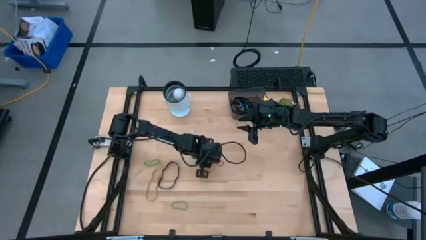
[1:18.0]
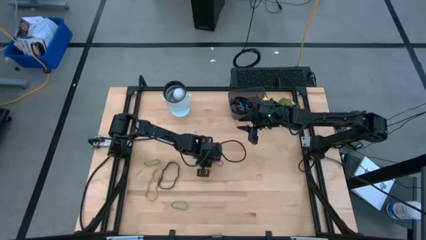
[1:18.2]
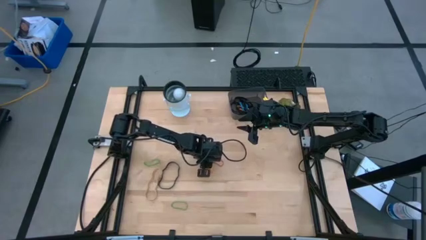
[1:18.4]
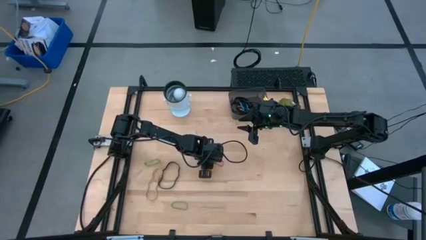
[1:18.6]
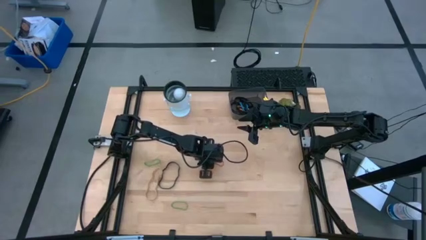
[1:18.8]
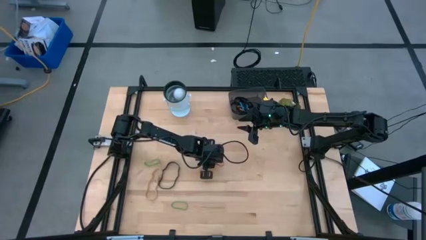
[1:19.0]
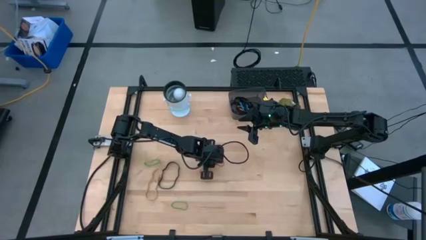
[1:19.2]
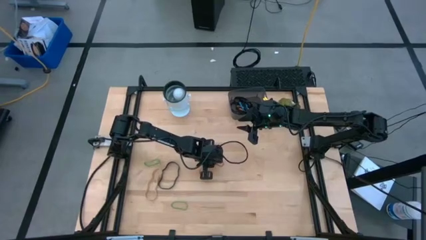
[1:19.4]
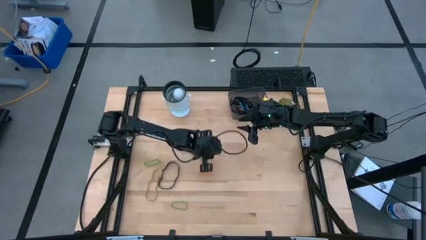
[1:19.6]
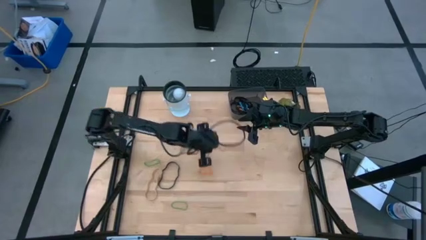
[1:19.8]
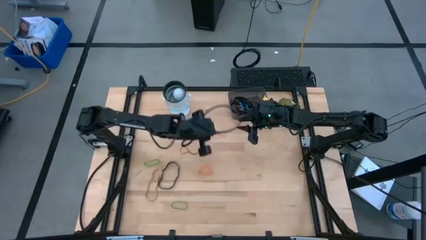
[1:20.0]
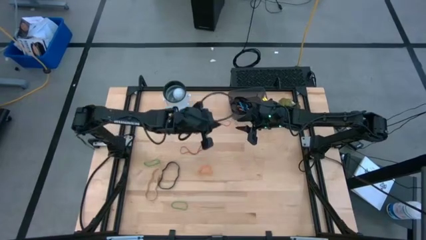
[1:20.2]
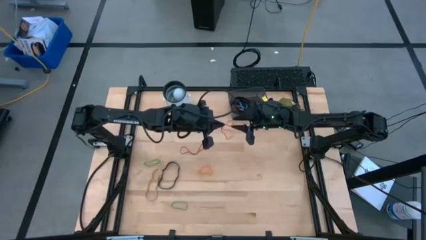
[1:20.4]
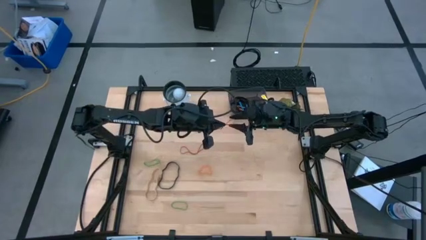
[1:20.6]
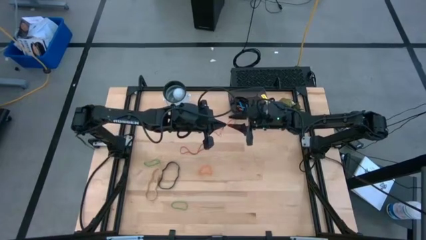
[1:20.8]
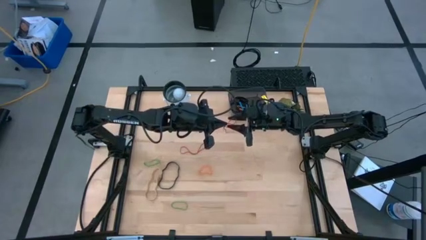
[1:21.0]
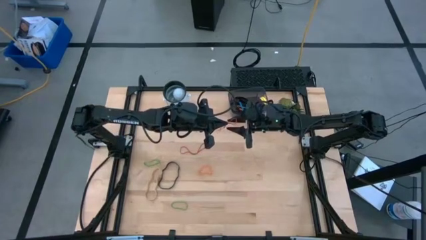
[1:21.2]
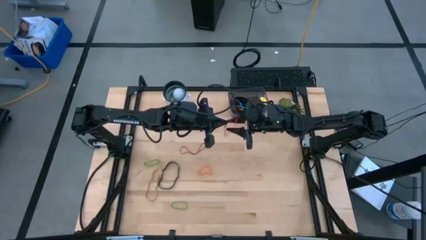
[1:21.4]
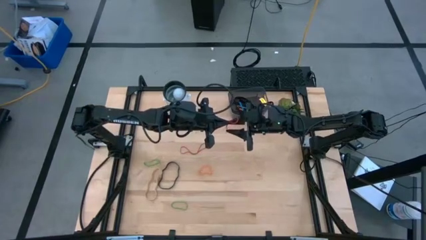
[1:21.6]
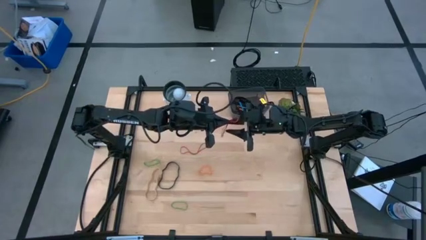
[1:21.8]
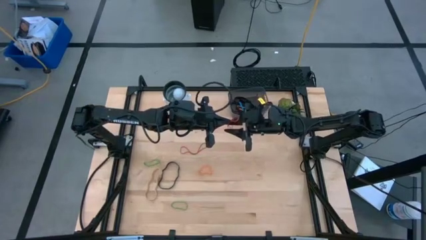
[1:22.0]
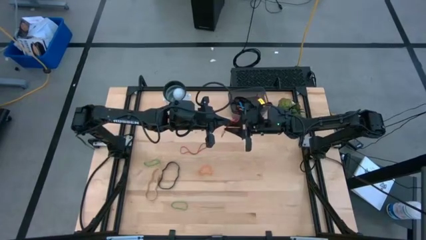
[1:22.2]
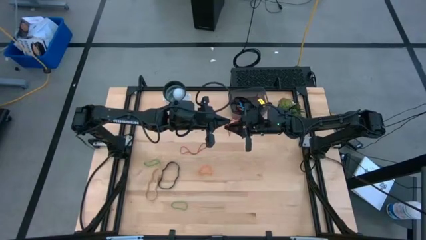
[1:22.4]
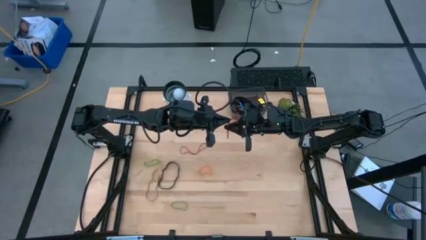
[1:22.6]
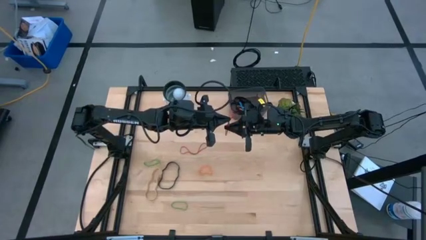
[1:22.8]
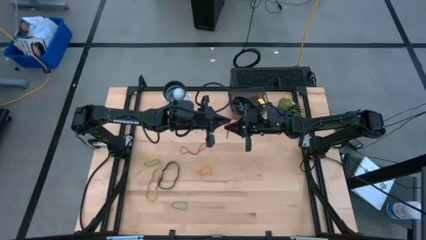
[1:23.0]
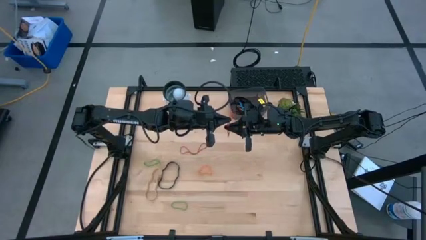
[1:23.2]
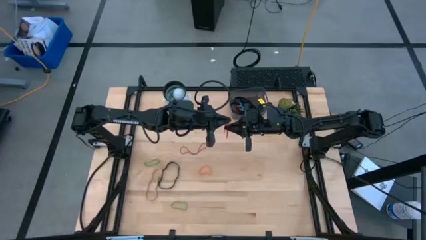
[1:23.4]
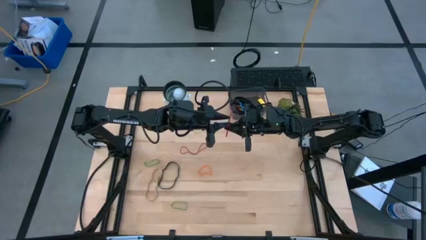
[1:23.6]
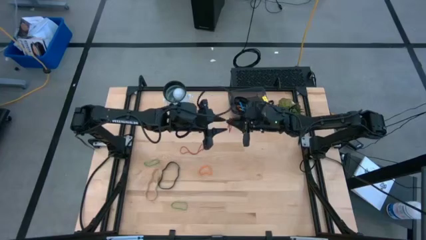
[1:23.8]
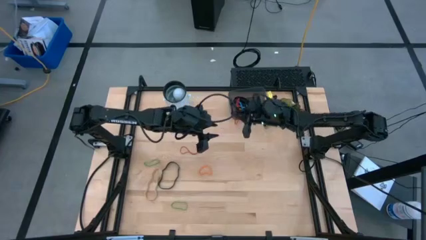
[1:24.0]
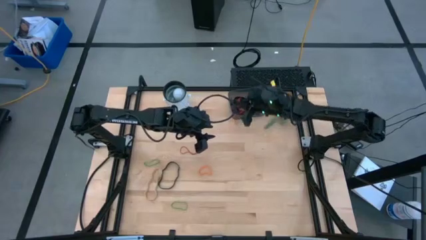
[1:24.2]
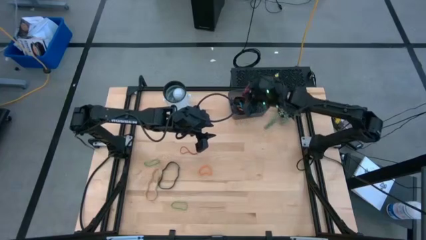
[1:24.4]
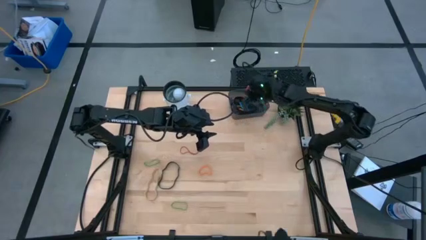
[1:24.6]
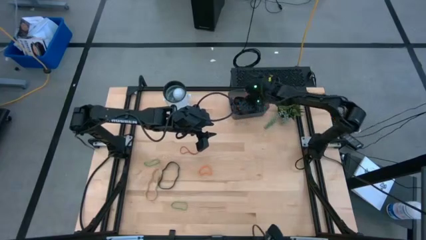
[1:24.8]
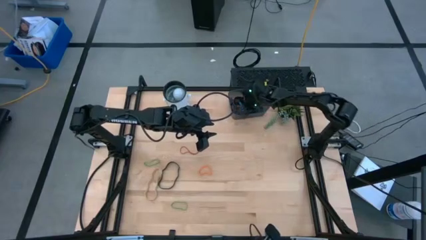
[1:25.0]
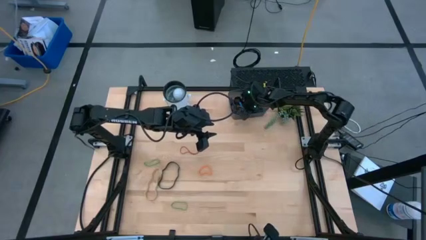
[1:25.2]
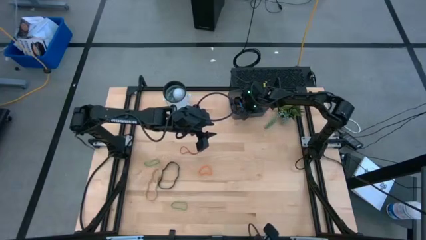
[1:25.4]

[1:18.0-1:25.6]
Task: Pick and place rubber bands into bin
Put the red rubber band into the black bin

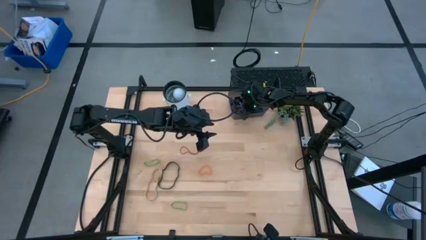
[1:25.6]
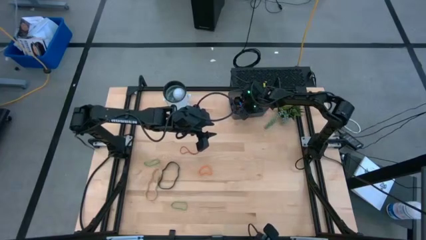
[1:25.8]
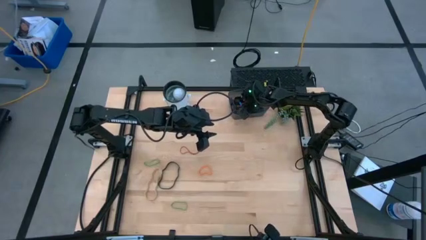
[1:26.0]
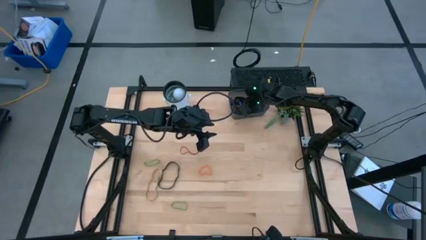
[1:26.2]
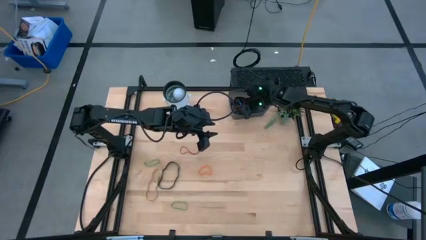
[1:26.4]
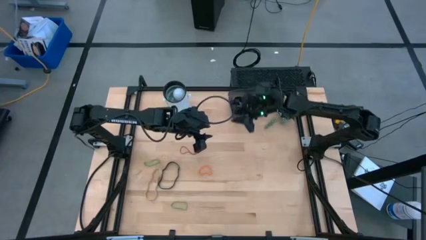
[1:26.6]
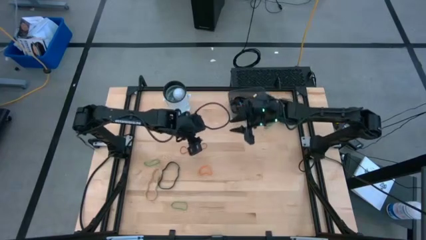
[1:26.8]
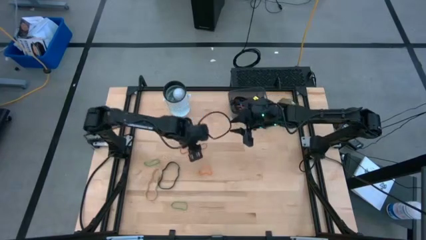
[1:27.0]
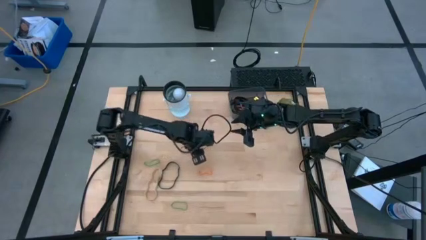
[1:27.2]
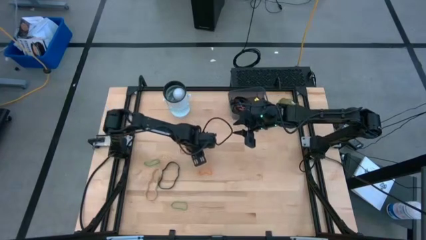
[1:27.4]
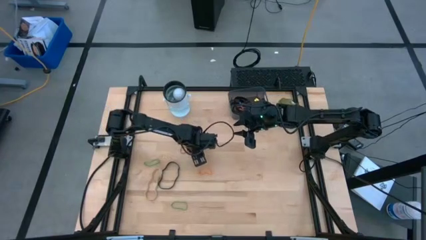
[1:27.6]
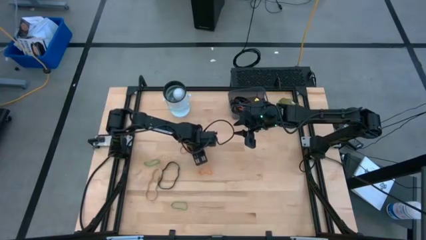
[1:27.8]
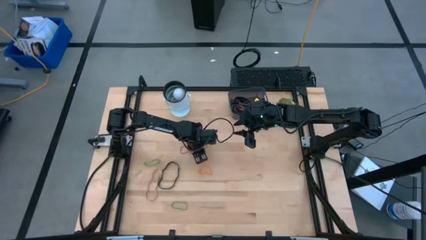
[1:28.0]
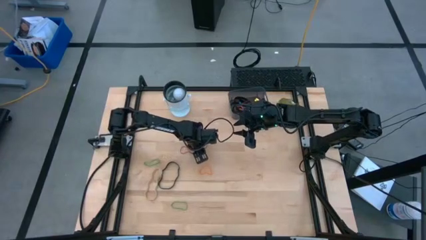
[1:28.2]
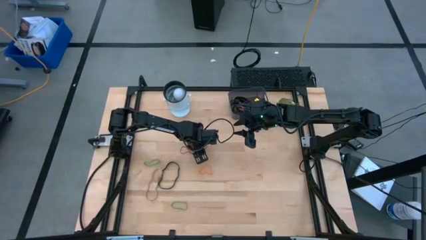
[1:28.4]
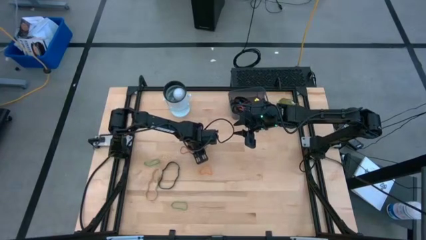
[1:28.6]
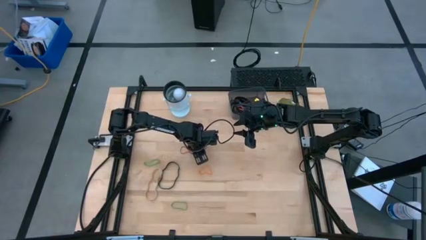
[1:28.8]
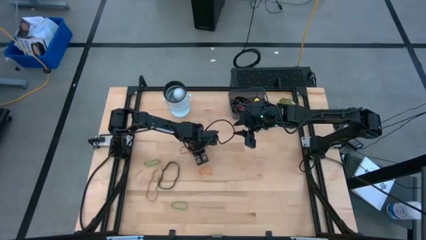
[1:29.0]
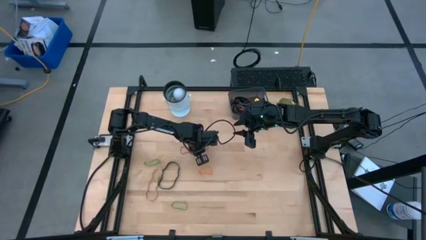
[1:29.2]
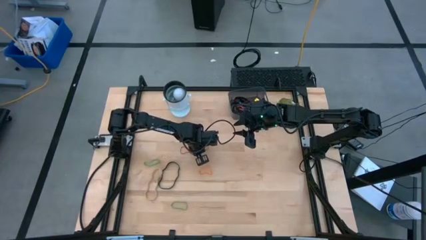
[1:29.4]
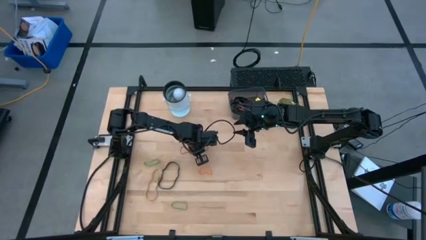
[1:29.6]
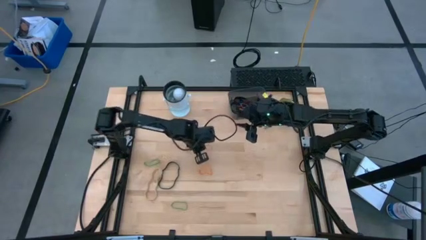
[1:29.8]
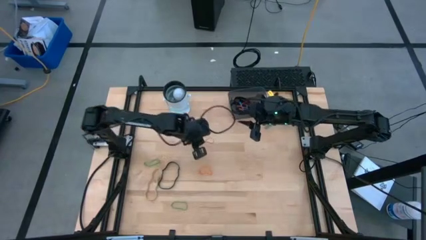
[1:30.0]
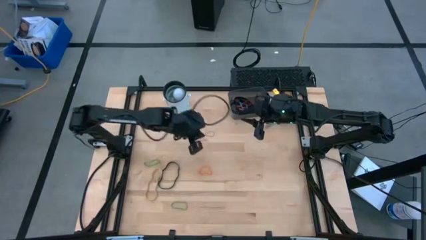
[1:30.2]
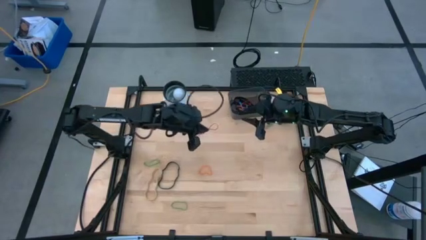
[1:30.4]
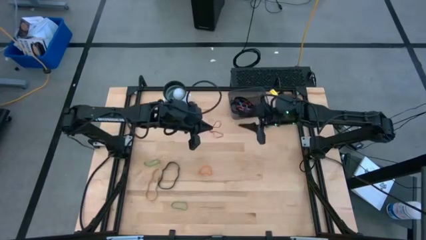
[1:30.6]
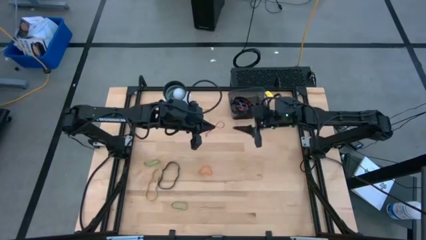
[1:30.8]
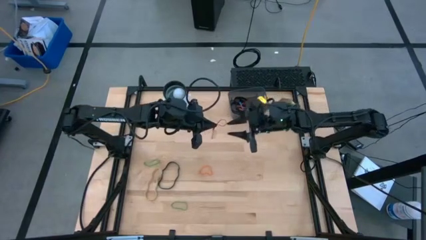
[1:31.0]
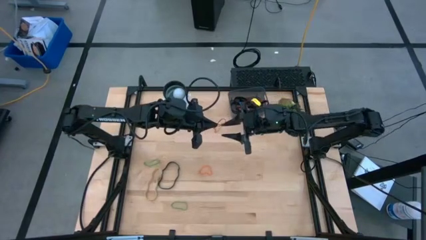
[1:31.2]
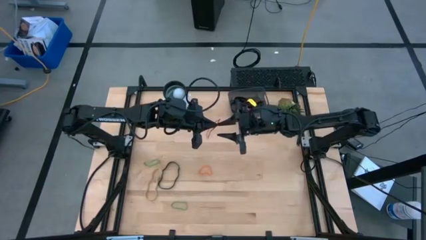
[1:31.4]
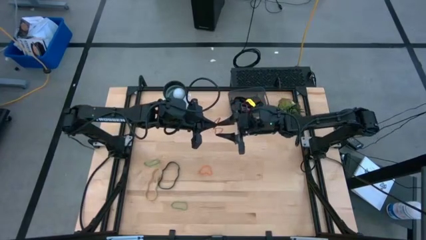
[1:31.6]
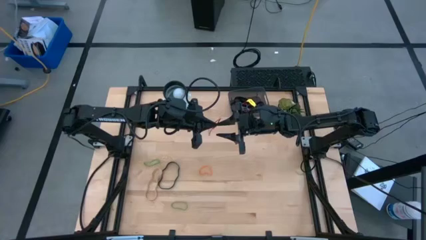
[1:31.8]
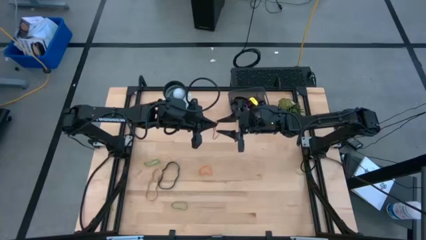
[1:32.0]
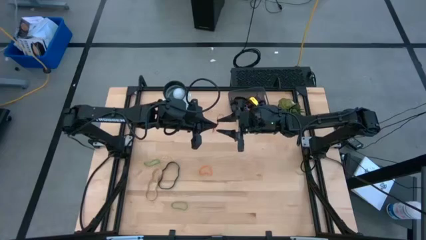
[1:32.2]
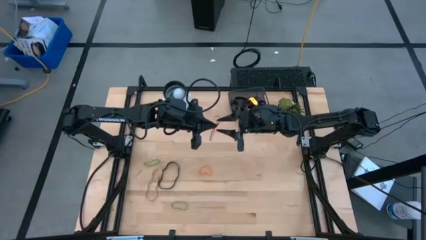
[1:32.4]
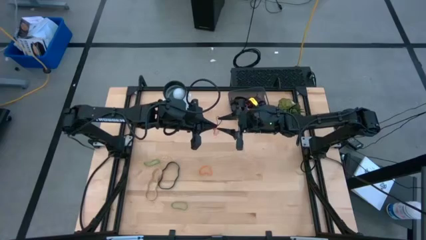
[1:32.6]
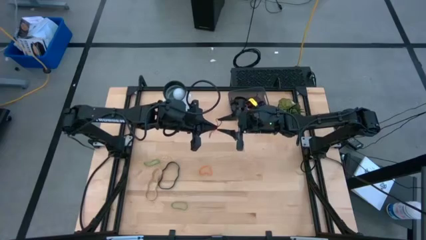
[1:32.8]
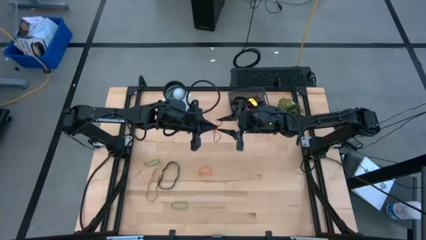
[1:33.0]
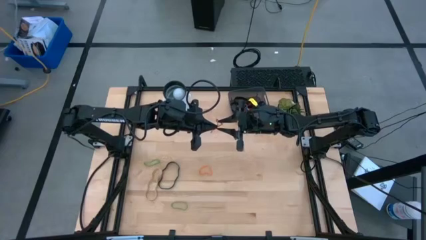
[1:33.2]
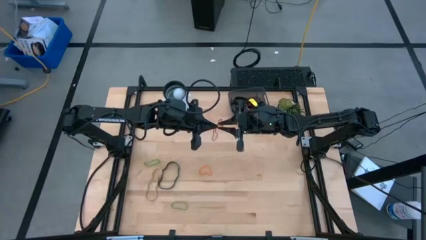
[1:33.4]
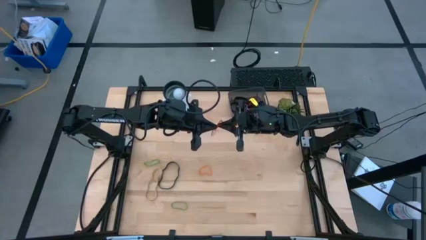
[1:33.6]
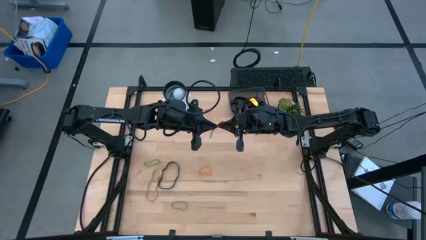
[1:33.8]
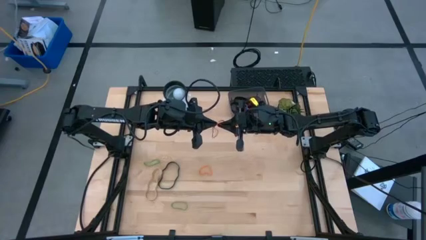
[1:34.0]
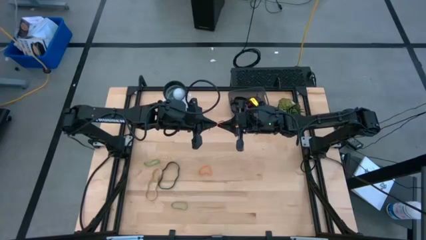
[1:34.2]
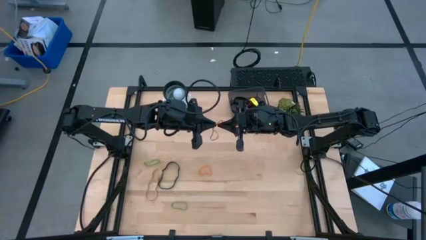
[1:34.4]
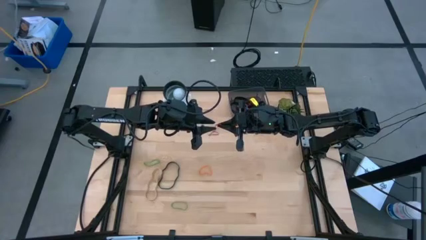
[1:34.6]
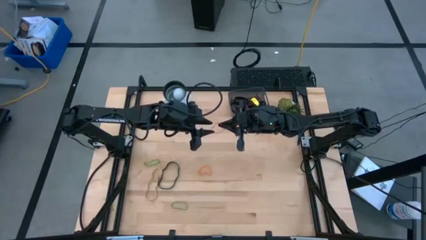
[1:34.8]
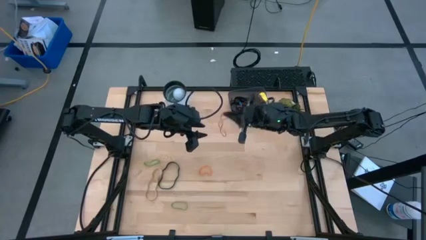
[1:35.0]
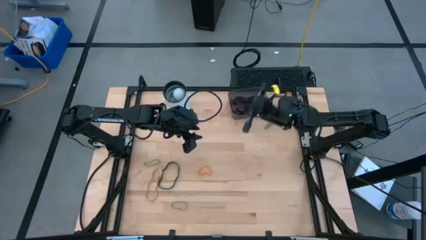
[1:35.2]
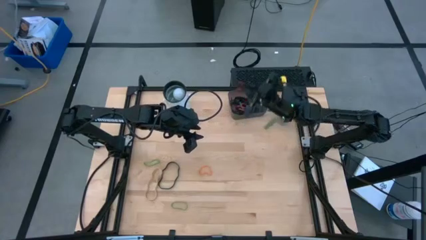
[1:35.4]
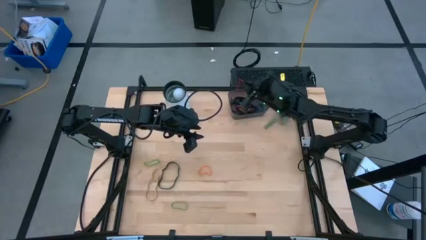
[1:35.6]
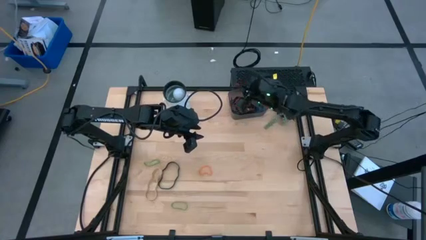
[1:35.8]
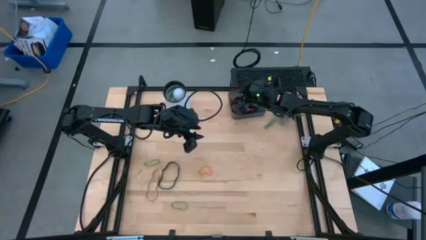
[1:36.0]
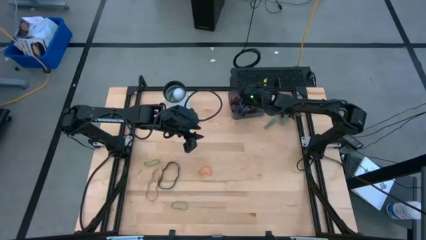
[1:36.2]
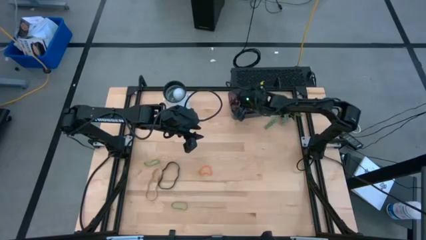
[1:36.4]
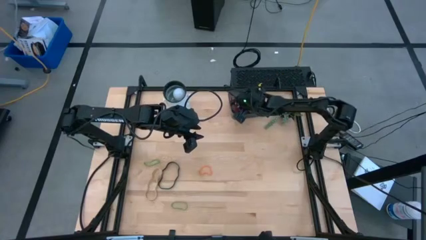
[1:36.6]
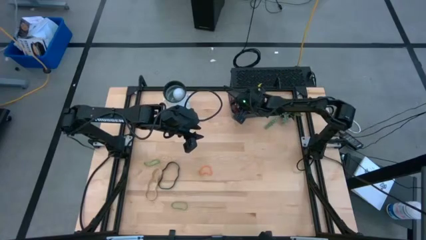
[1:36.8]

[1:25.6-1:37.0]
Put the red rubber band into the black bin
